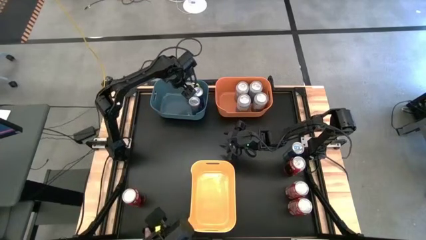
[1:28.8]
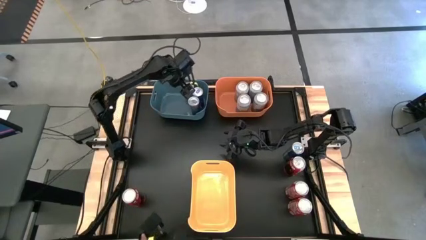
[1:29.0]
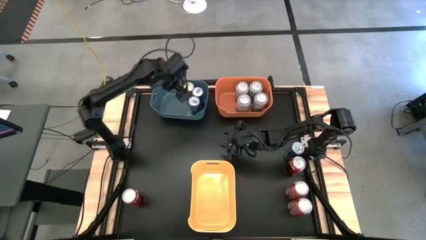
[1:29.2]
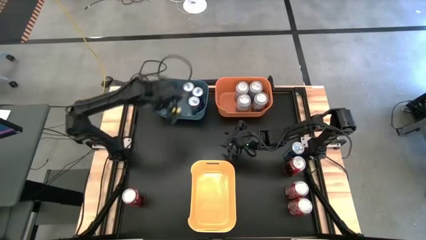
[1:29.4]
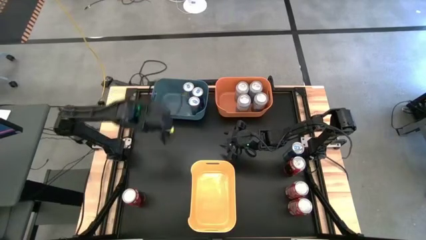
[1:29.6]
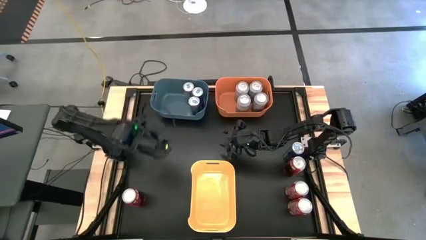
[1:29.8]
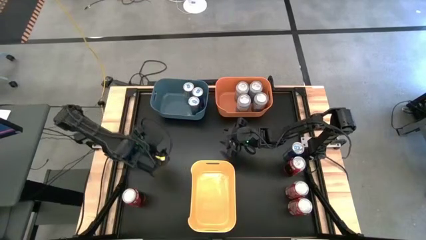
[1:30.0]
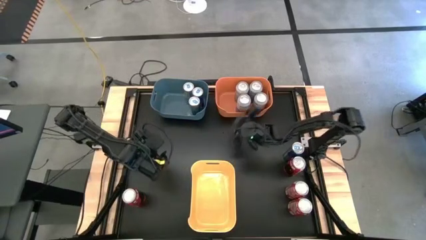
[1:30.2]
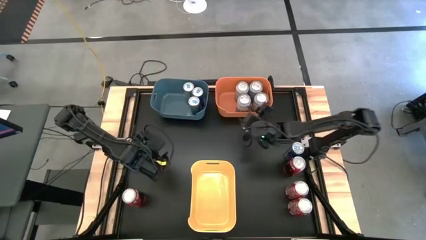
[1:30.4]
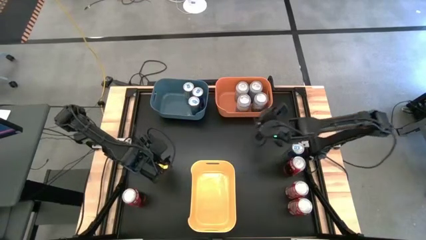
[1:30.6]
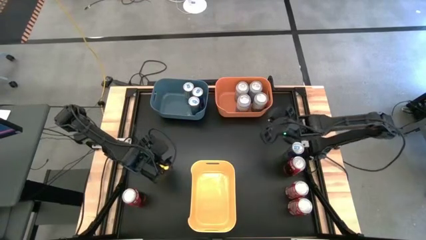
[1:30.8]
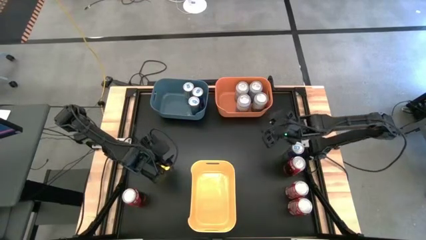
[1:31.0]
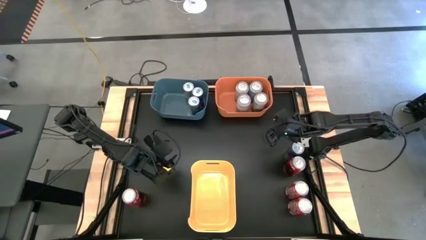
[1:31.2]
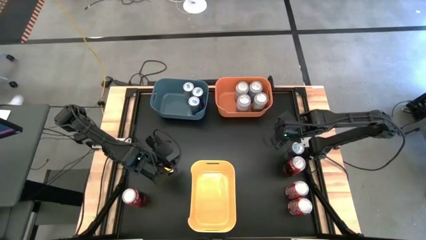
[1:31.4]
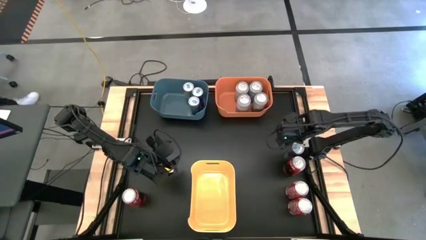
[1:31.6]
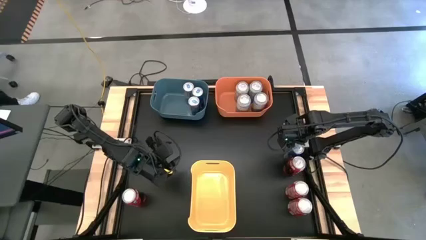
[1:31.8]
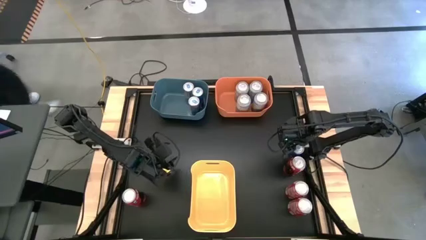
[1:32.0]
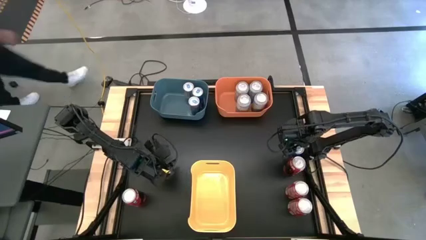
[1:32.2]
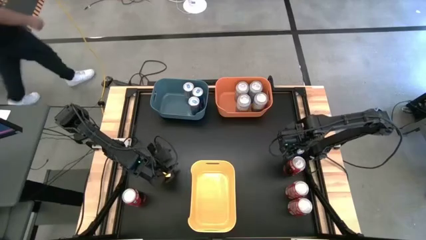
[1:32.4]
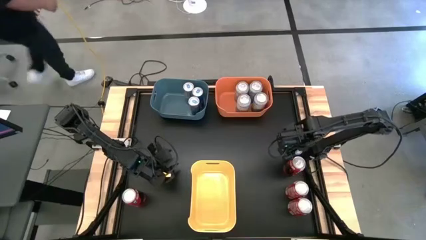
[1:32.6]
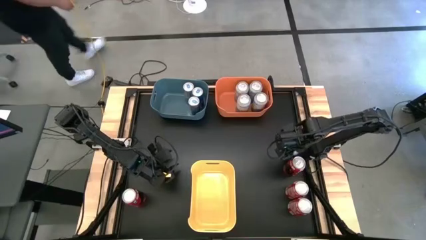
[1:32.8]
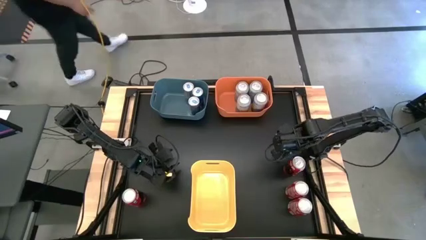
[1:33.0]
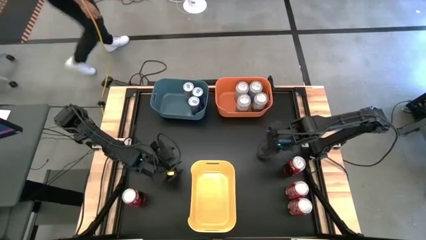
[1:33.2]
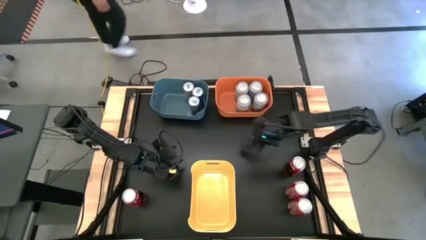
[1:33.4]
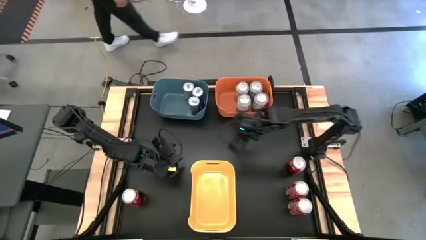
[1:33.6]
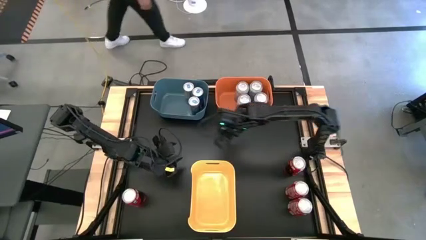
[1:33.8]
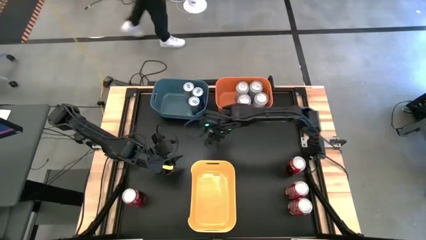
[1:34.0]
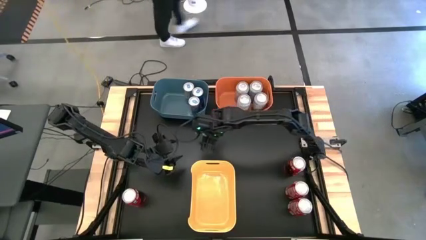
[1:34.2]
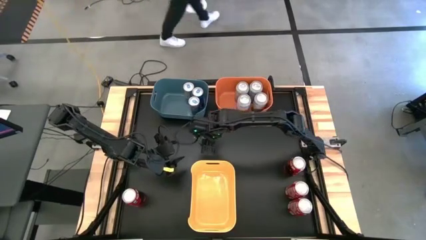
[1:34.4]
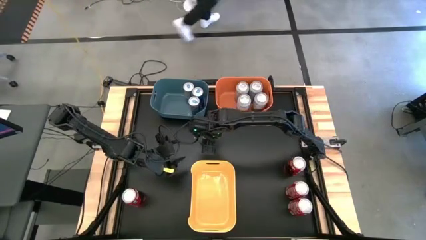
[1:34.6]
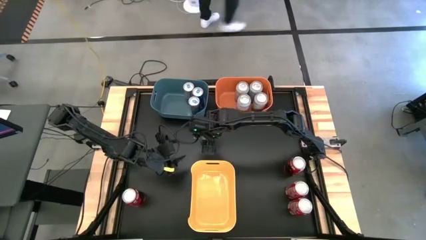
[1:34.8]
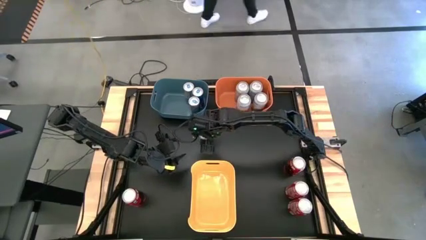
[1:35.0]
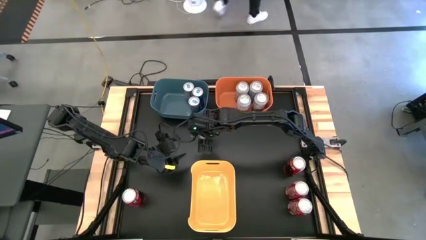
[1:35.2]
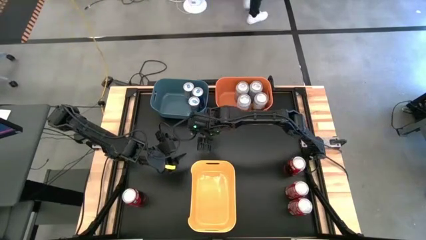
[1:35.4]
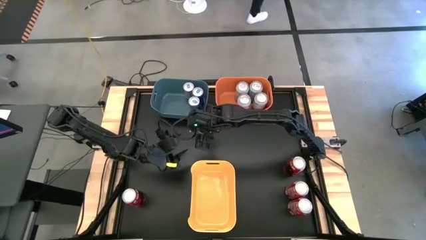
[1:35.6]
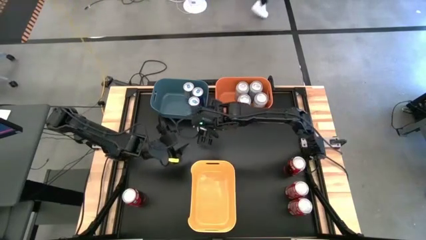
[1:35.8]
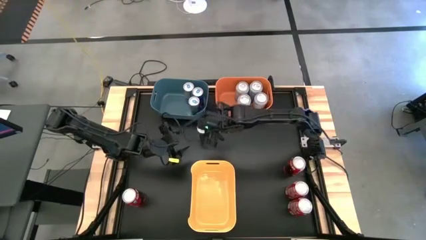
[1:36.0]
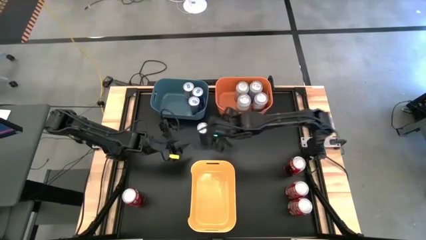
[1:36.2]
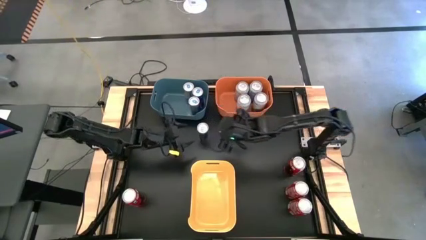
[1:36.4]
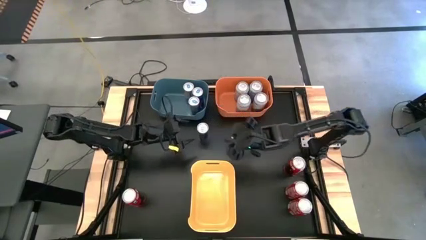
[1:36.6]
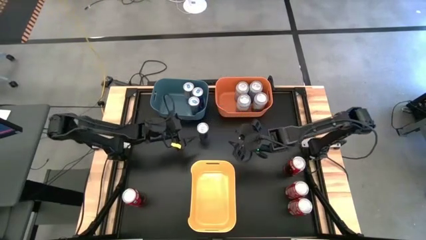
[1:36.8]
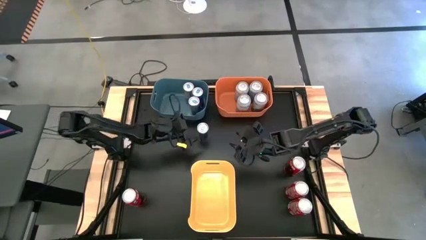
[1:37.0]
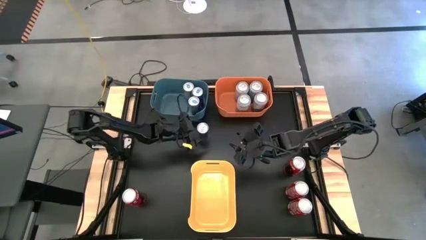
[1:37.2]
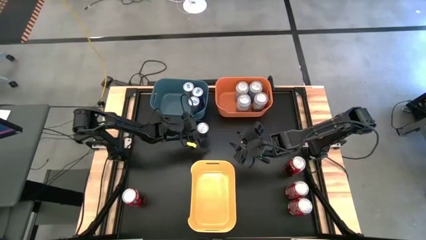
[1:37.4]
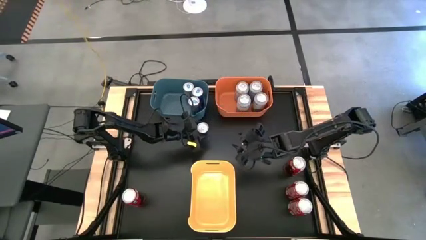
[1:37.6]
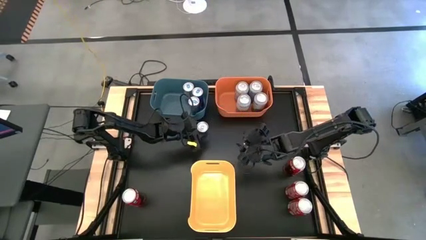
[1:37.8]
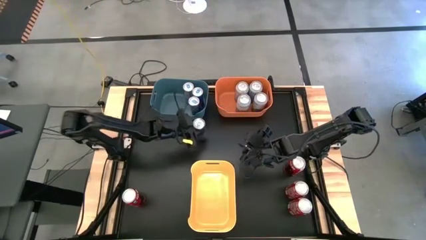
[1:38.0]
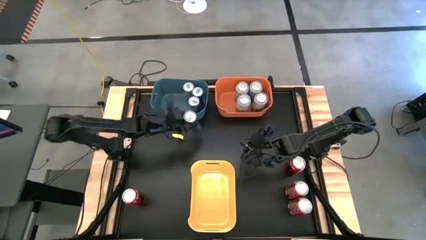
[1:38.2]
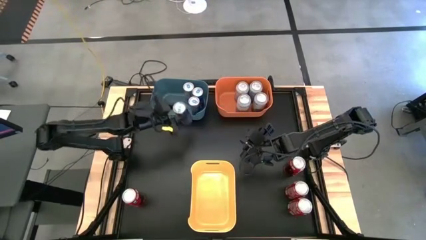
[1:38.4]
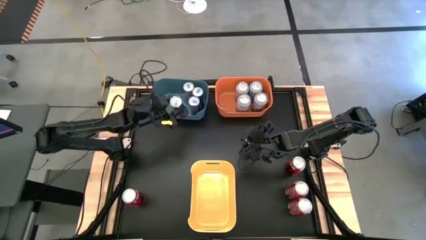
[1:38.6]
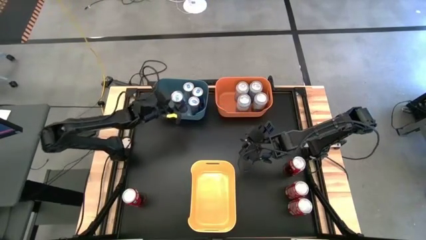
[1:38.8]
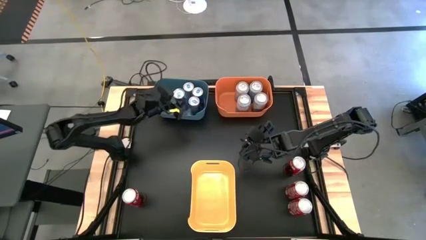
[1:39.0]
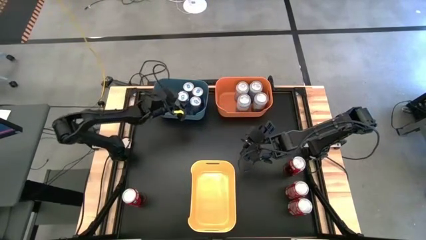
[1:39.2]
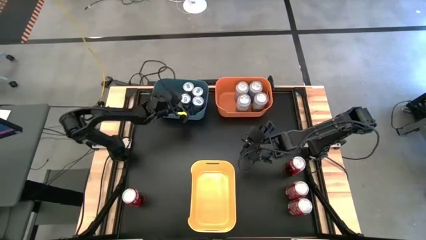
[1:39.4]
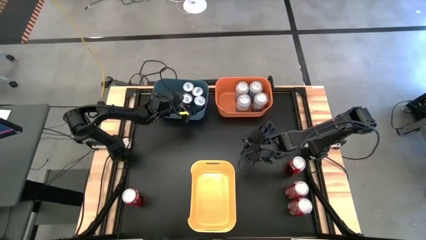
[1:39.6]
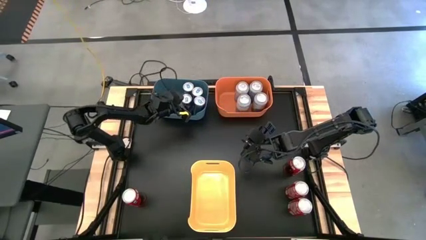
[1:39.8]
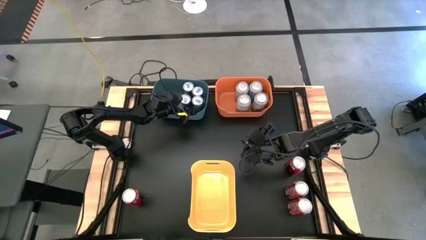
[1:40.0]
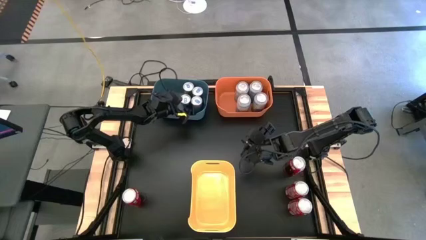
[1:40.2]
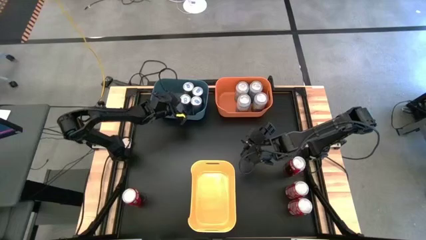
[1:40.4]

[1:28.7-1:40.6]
Task: Sort soda cans
Put the blue soda can into the blue bin
